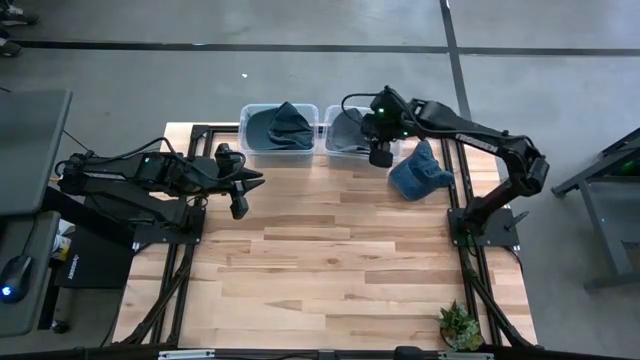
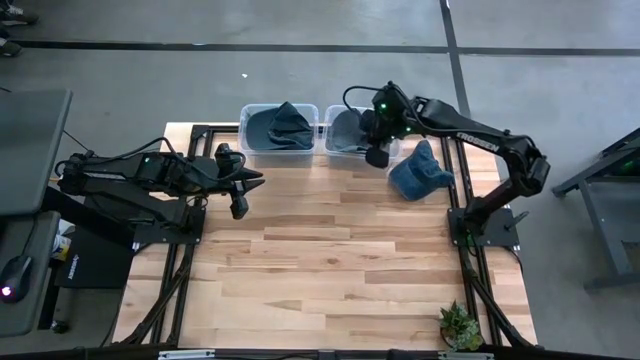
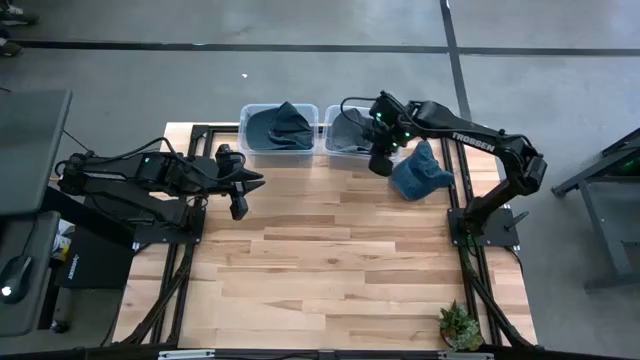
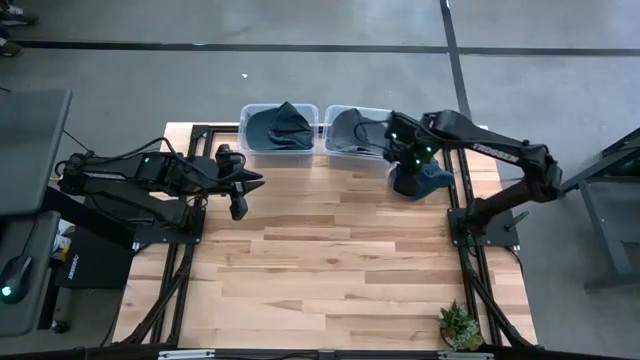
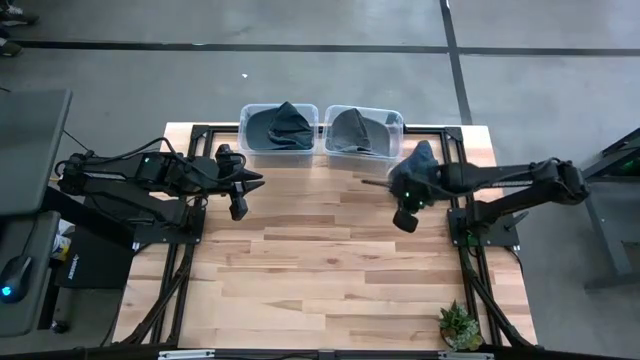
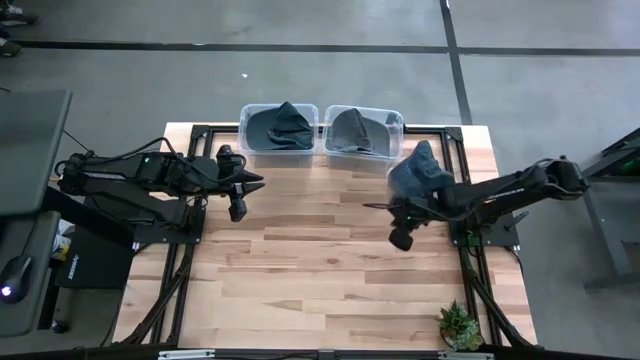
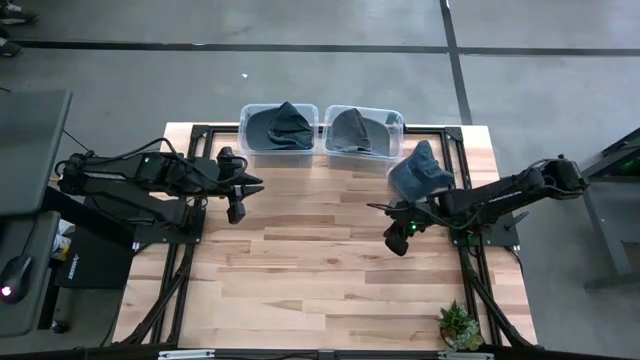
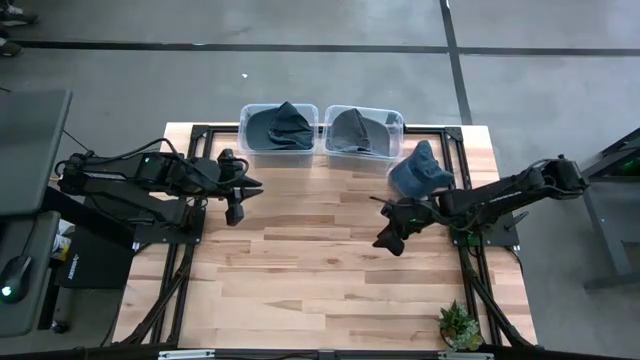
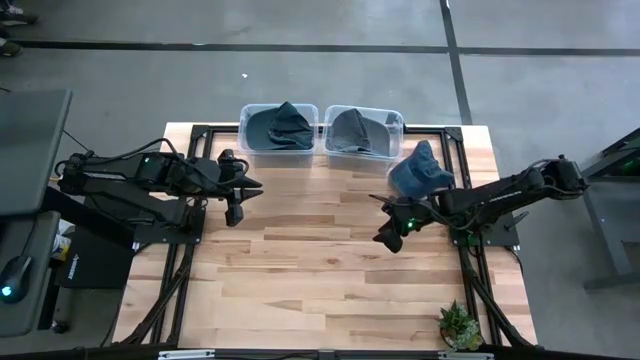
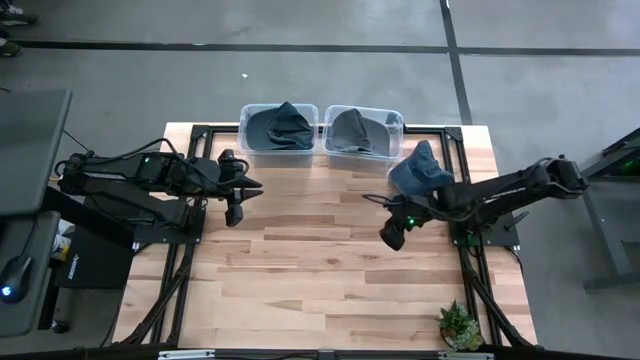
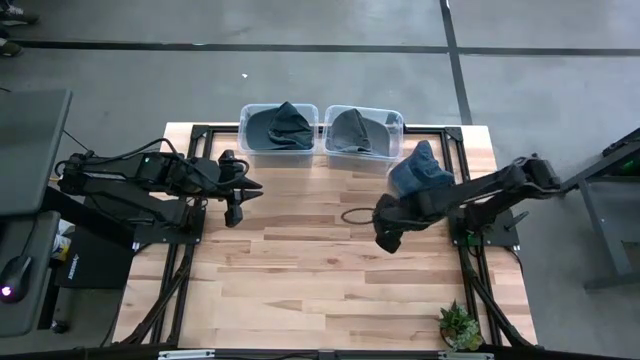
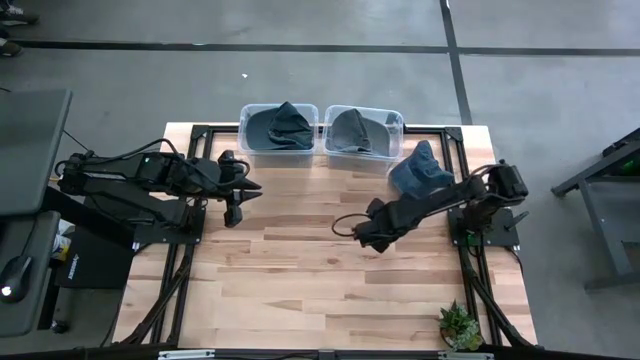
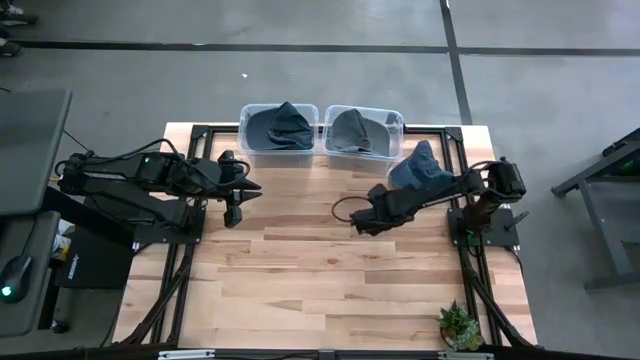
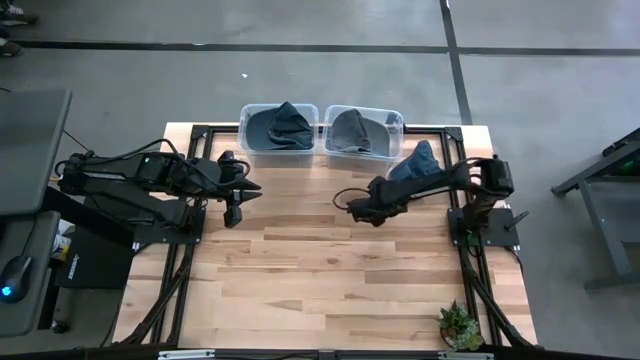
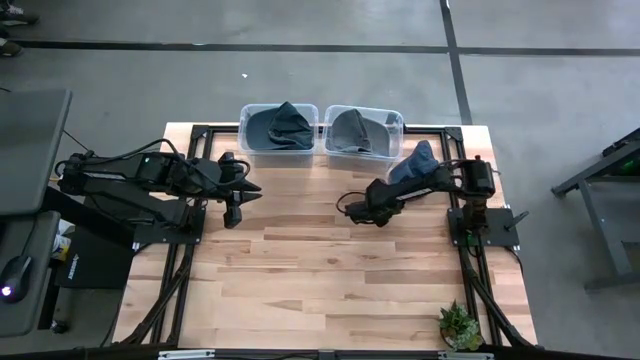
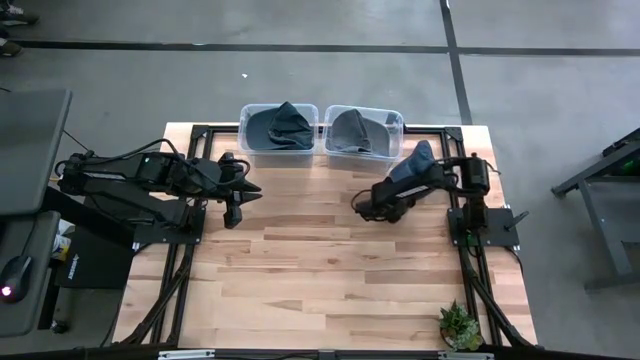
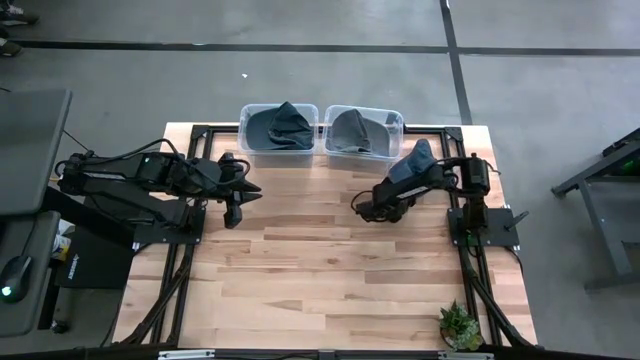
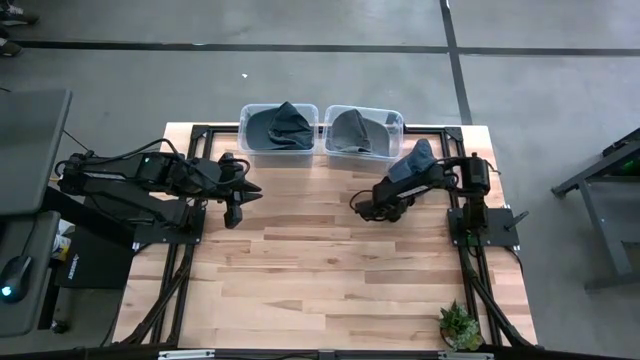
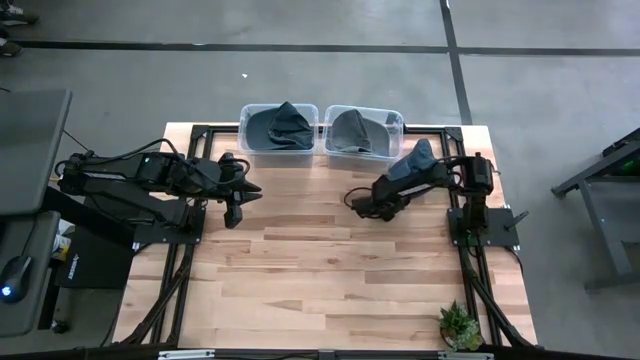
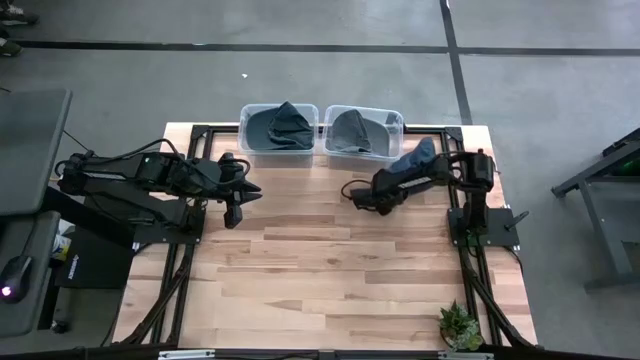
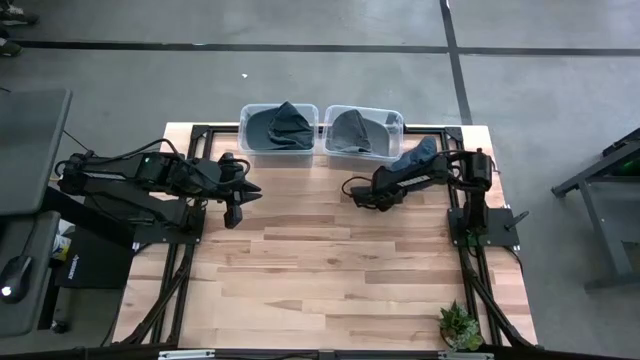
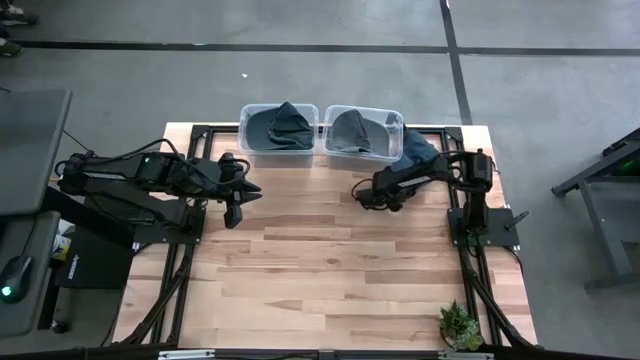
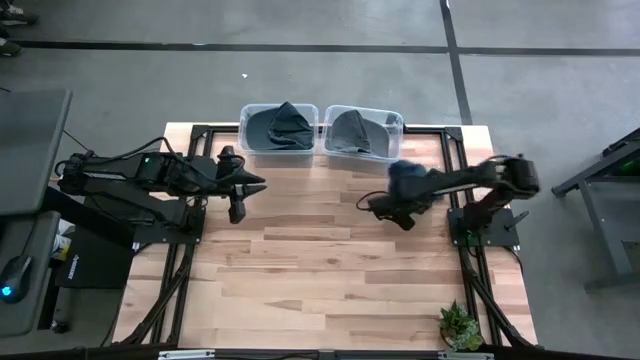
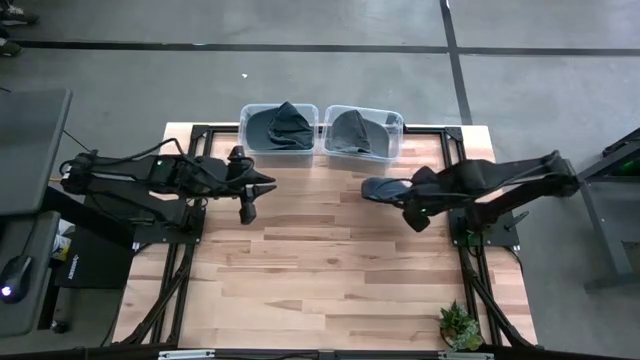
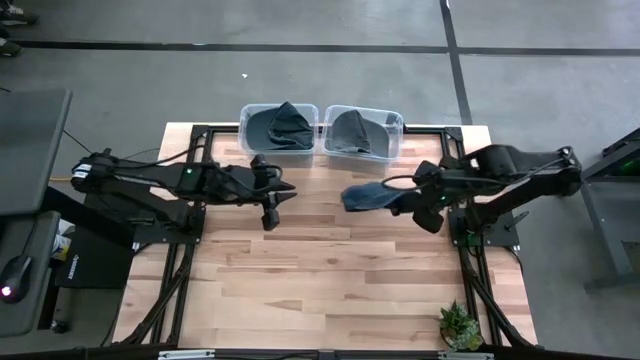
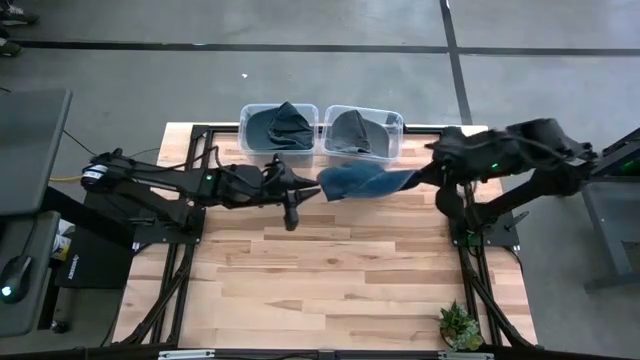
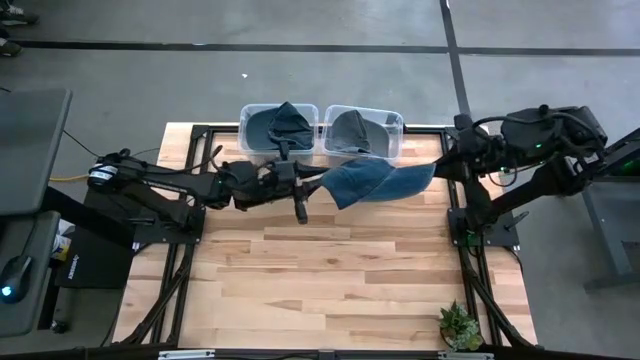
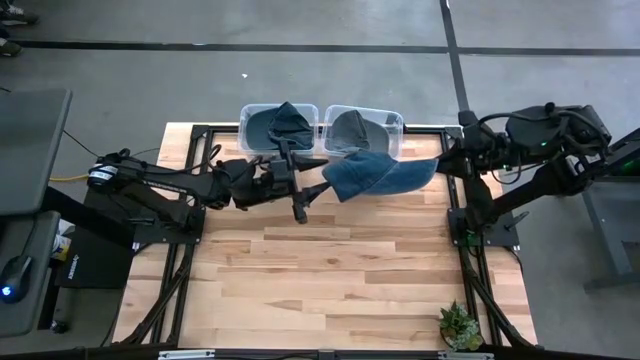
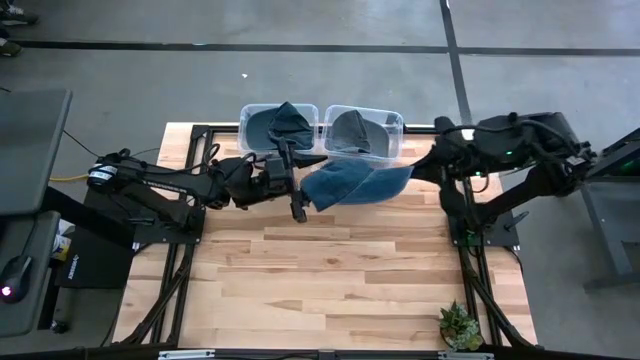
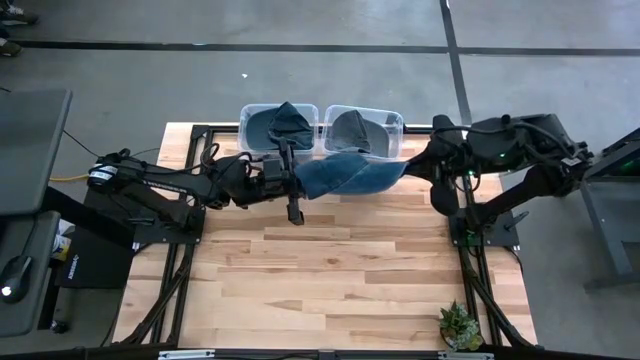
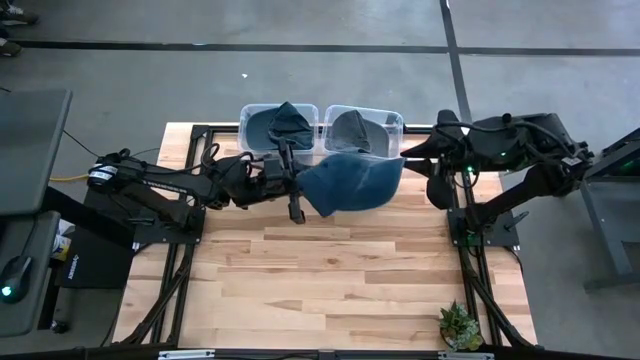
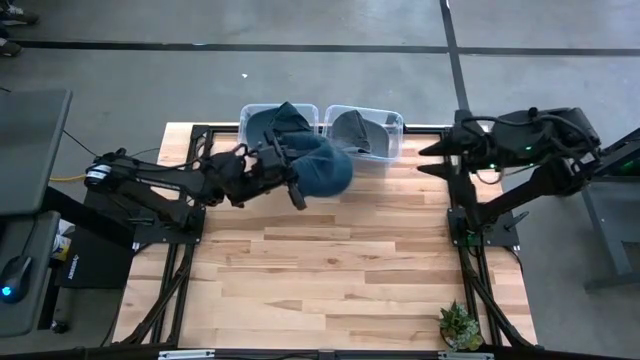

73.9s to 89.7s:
Task: Pick and place caps into container
Put the blue cap into the left transparent container
